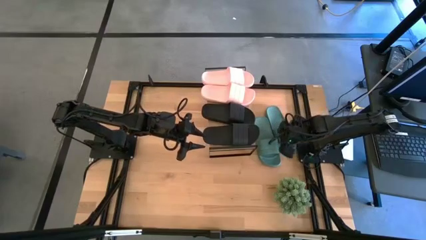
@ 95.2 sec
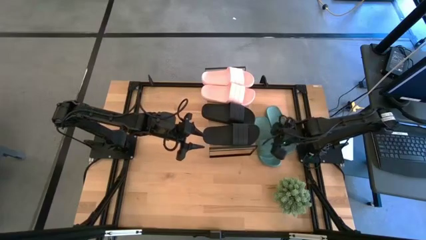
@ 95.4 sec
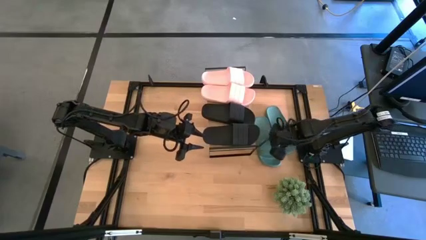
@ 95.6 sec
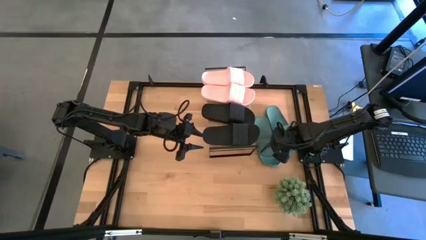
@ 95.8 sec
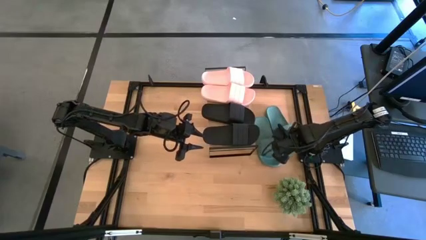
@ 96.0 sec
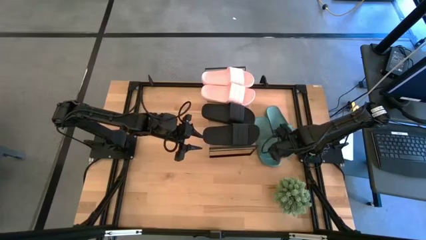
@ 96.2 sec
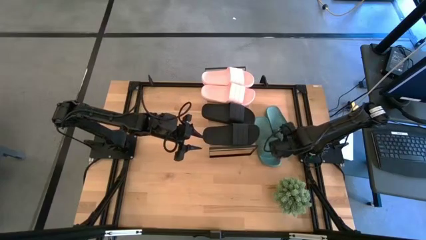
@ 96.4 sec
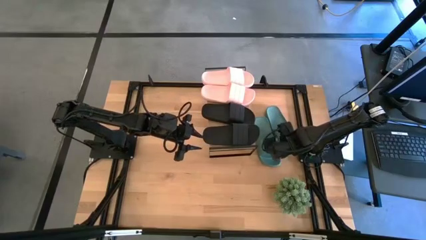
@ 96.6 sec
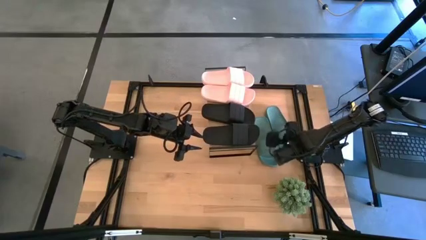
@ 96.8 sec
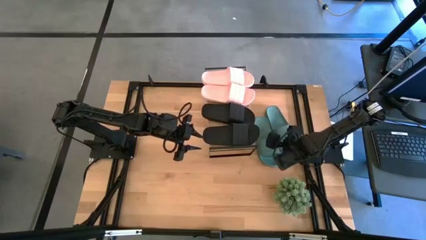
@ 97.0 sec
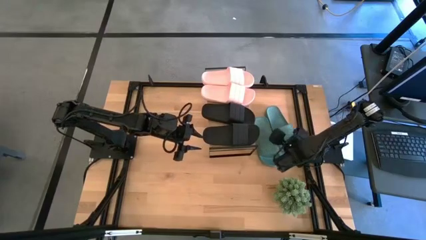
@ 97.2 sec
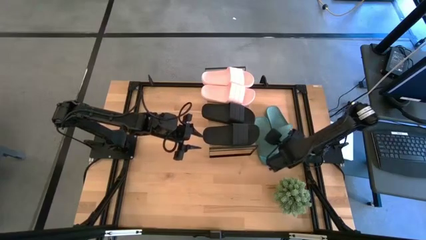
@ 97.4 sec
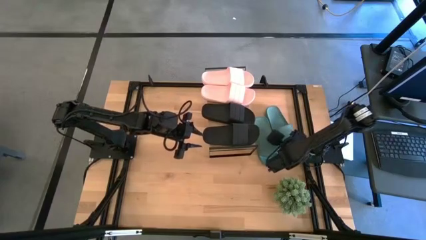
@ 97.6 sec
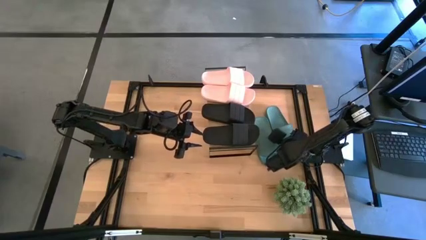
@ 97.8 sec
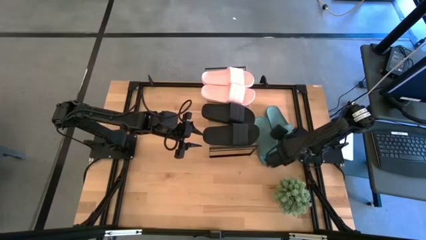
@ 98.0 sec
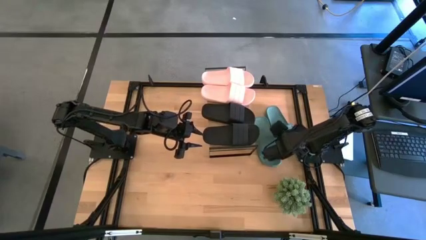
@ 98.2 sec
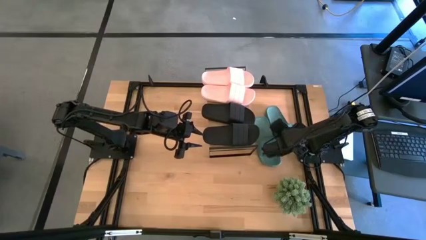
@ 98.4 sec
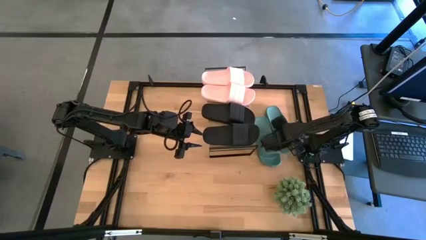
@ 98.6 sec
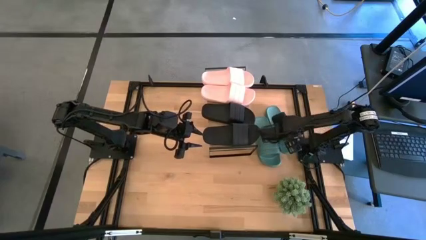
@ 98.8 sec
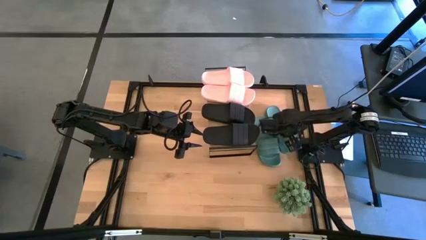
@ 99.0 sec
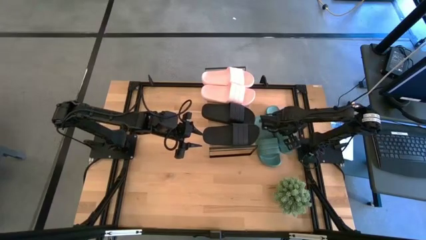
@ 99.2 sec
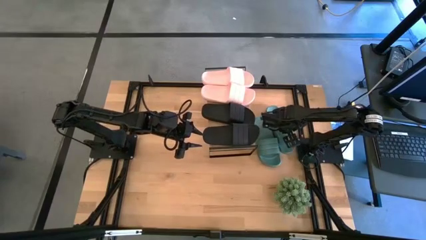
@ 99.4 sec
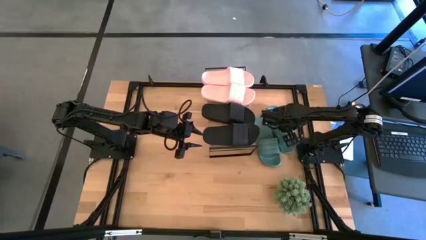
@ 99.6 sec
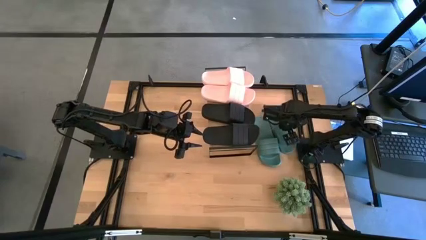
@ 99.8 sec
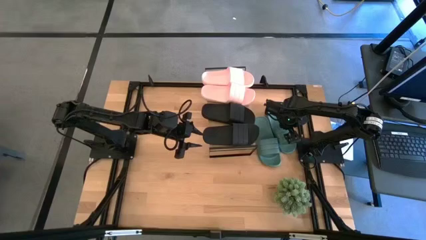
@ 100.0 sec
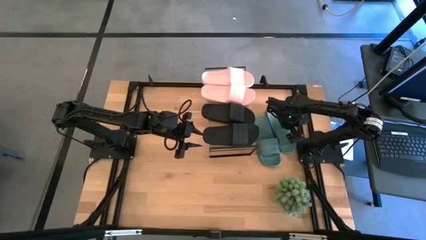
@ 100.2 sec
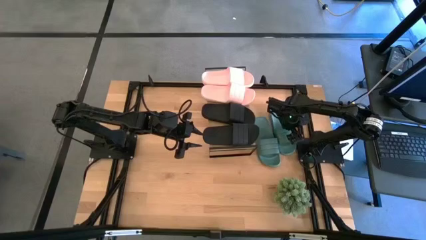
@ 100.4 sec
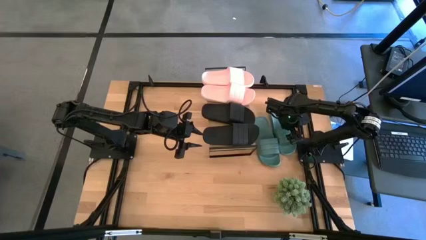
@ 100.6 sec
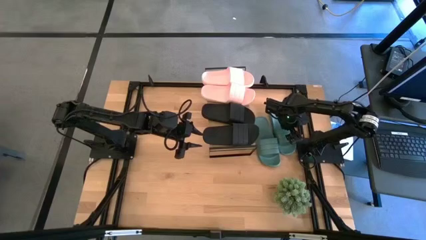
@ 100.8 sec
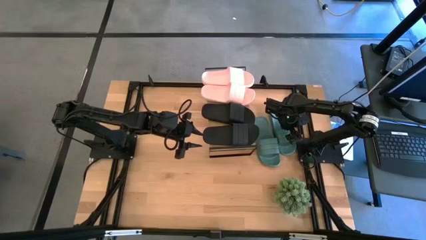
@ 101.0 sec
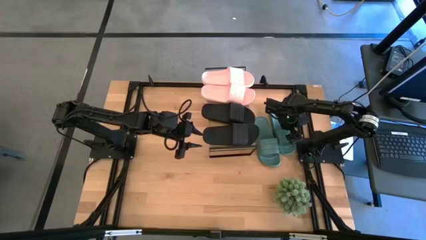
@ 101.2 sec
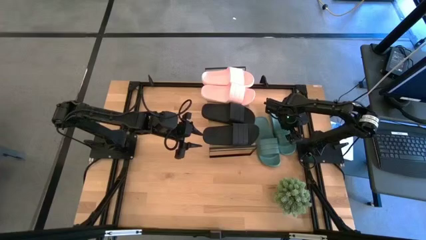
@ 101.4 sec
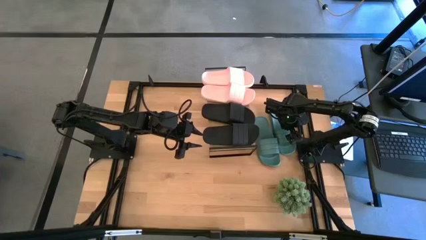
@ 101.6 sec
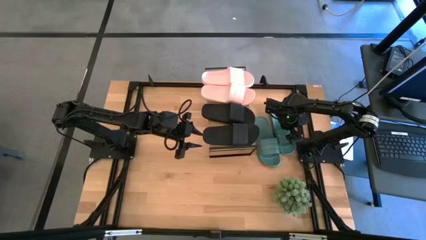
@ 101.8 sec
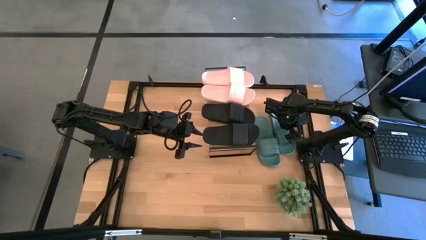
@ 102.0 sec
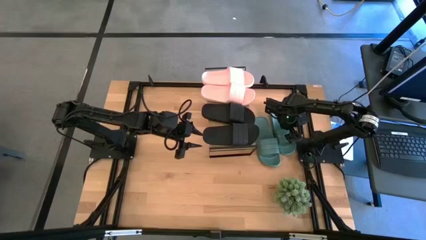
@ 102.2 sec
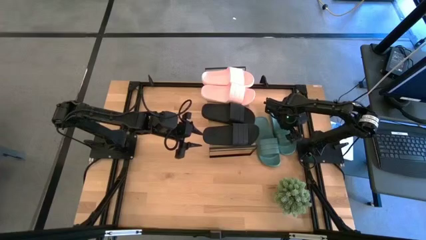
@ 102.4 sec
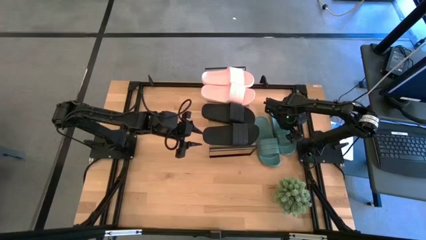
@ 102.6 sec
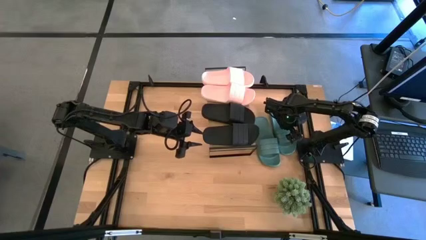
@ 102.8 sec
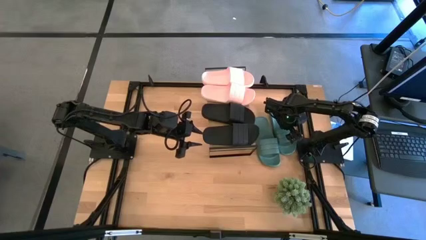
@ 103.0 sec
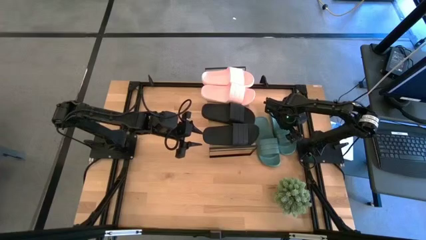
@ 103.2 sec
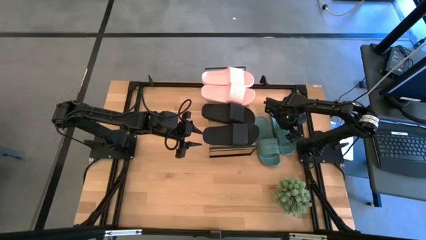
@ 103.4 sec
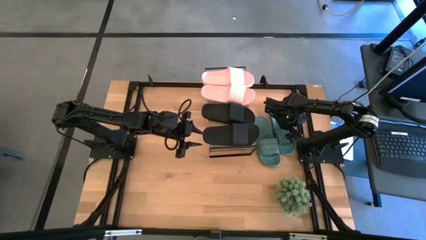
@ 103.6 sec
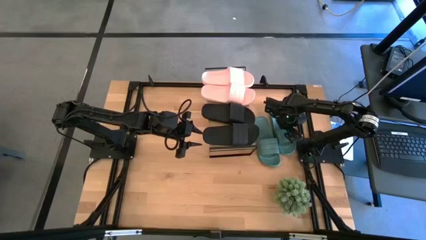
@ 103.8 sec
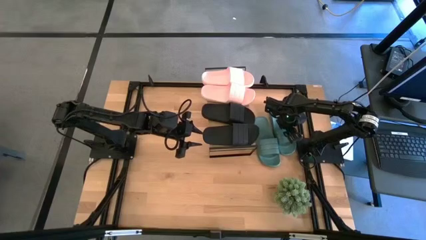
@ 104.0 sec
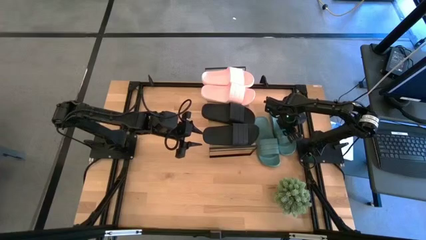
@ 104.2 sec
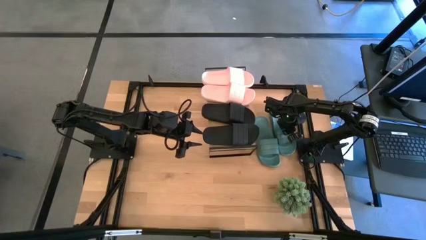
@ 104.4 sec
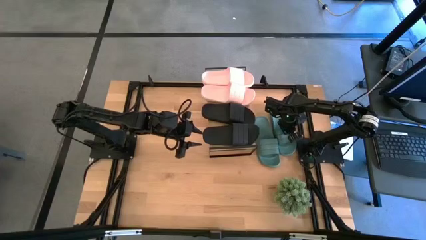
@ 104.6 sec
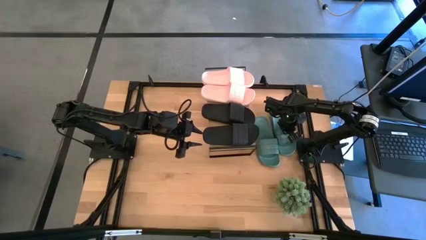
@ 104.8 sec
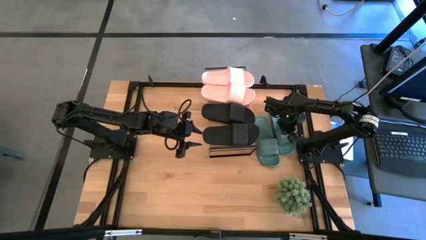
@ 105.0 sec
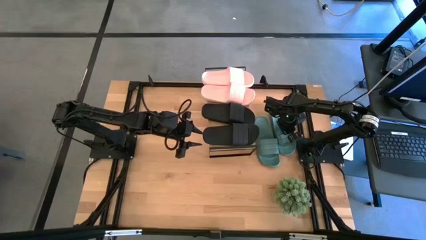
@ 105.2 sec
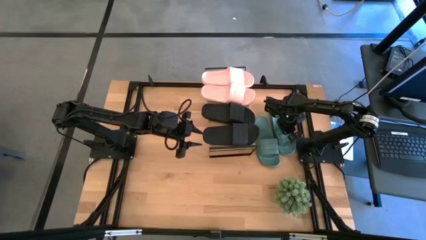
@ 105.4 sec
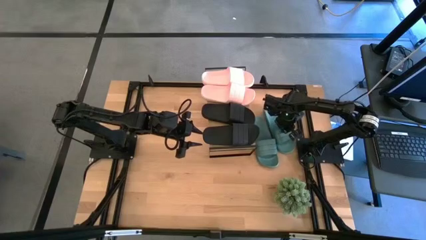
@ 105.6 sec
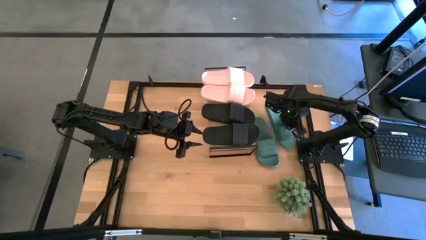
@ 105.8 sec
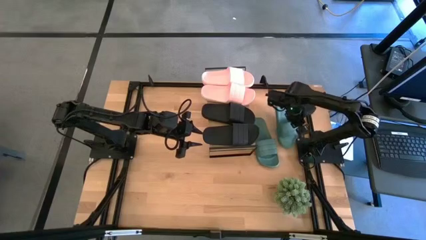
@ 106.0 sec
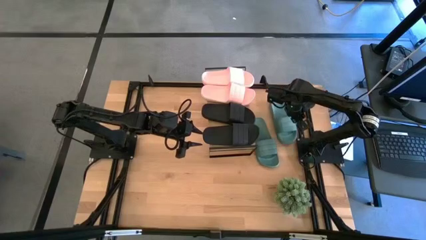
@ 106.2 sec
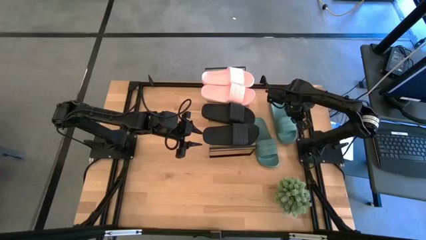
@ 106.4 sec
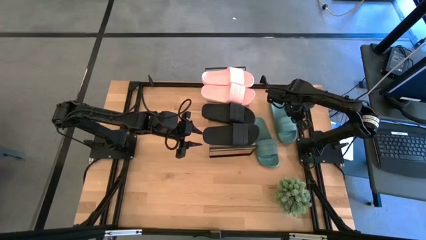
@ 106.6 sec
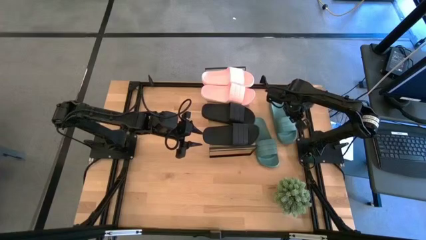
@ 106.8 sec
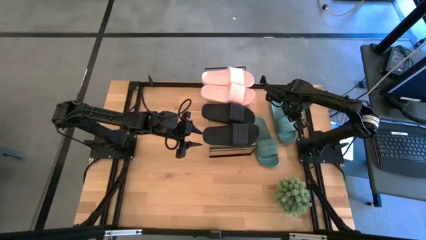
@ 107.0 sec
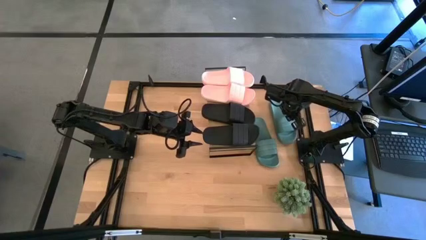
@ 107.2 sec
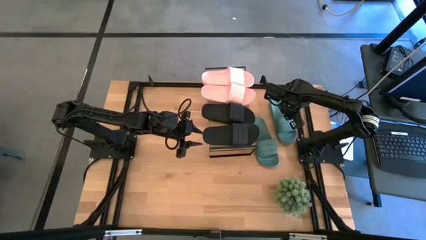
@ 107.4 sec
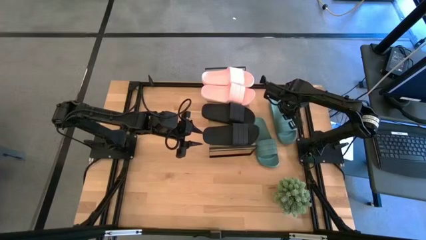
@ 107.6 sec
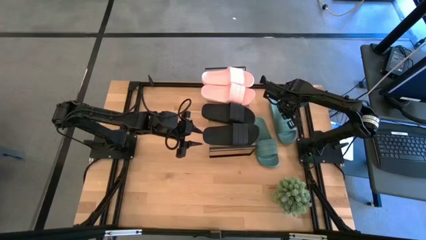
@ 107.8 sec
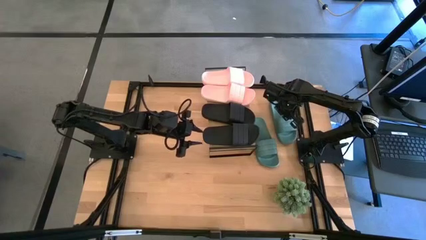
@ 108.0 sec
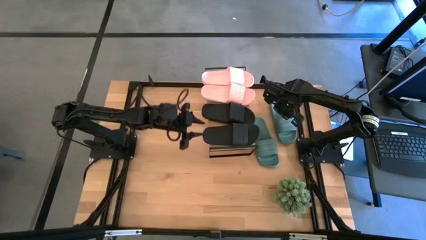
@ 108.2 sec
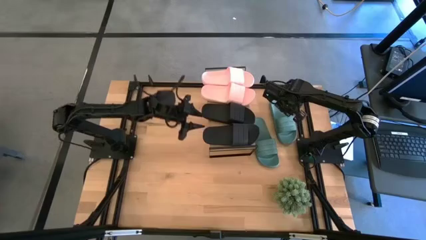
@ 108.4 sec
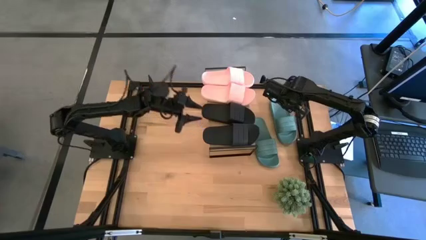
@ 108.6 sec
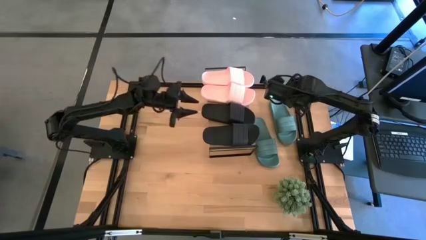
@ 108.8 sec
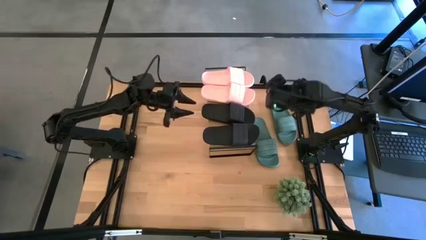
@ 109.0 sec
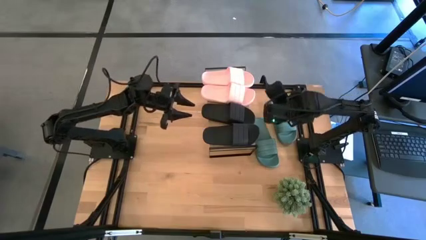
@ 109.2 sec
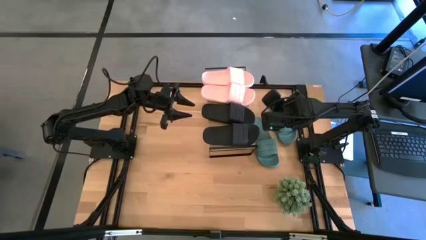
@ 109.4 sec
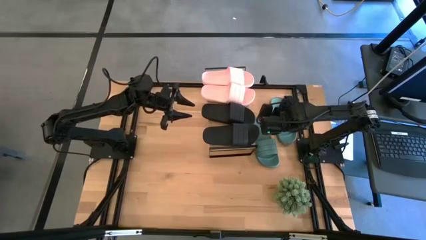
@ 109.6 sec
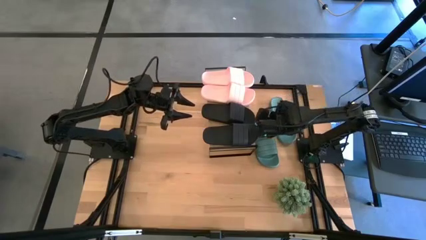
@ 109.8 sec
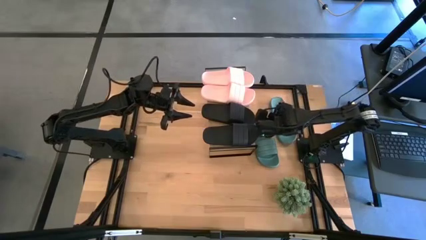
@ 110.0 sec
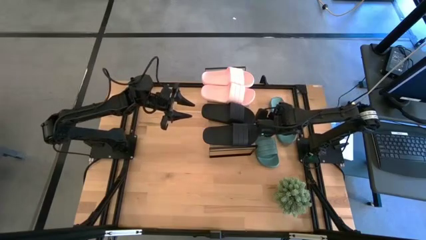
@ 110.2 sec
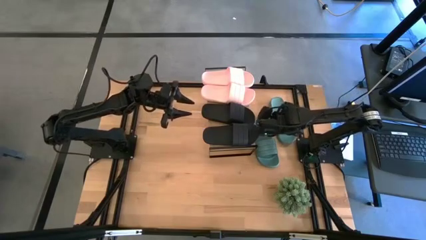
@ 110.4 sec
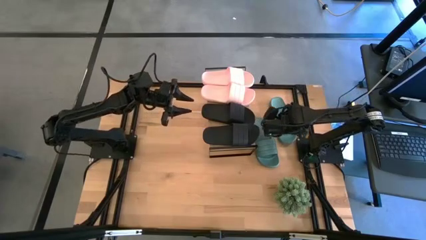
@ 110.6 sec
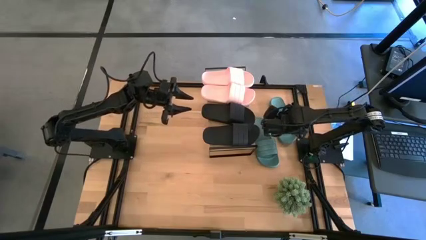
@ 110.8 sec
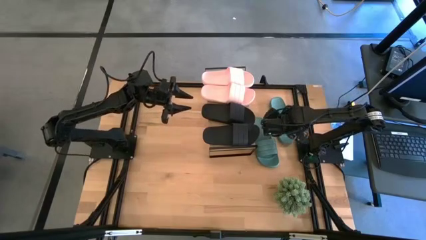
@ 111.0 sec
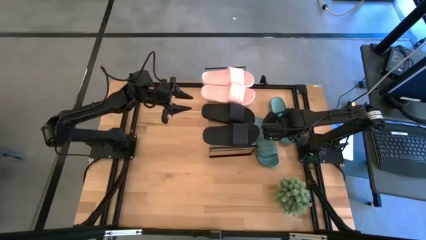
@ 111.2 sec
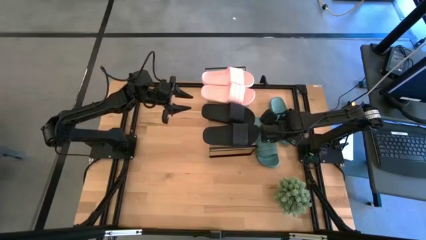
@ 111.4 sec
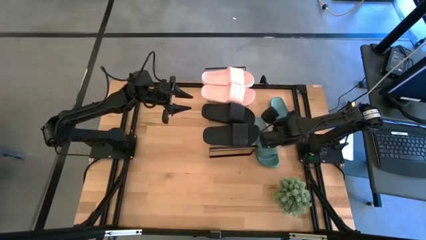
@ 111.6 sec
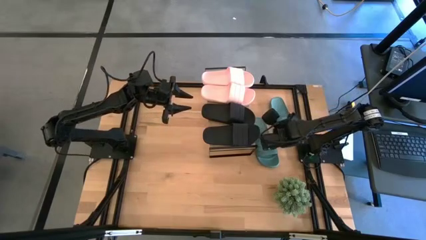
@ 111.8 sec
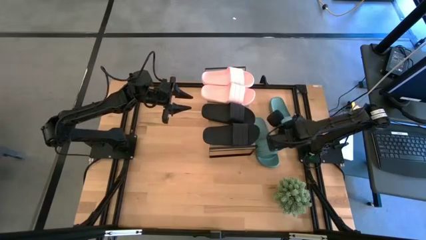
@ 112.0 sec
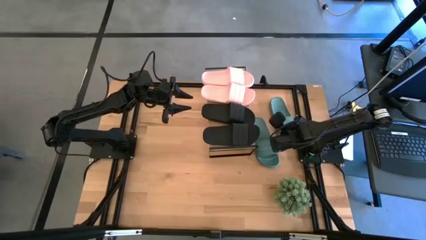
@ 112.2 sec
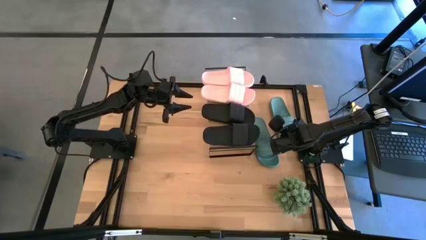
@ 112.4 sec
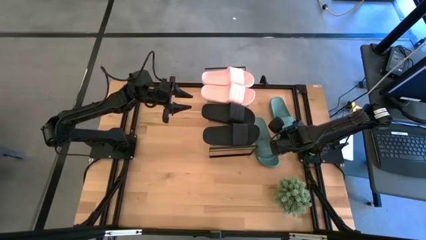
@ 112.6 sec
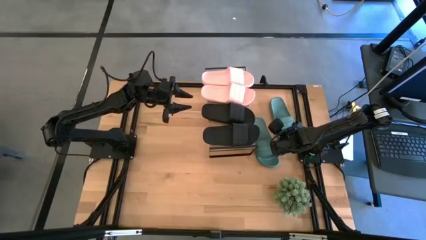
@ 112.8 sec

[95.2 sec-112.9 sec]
Task: Pick and place slides into the shelf
Put the right green slide under the shelf
